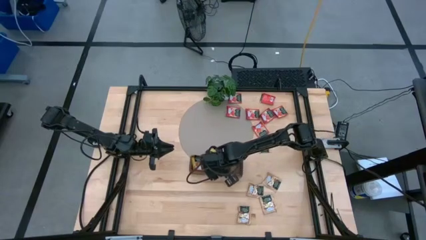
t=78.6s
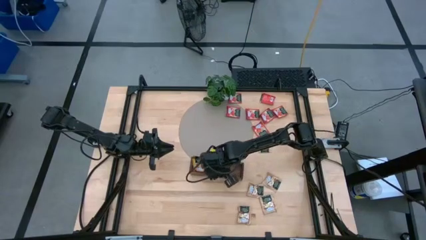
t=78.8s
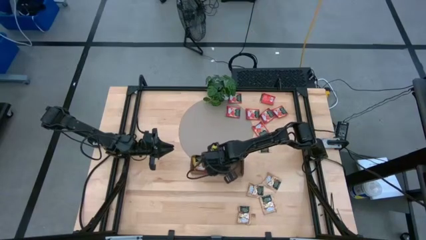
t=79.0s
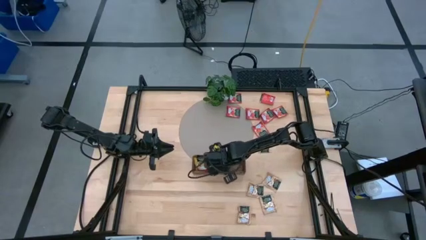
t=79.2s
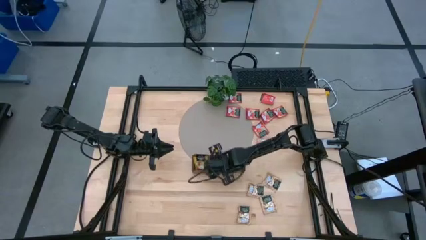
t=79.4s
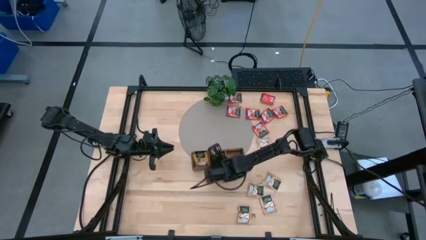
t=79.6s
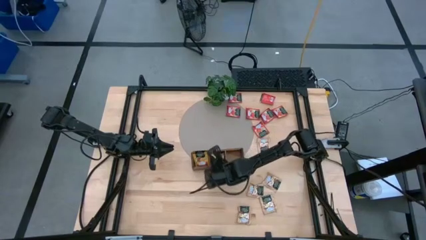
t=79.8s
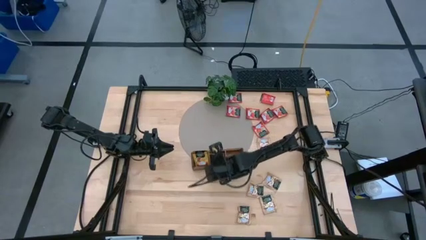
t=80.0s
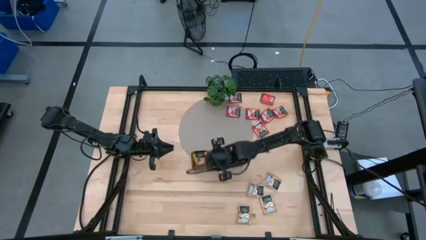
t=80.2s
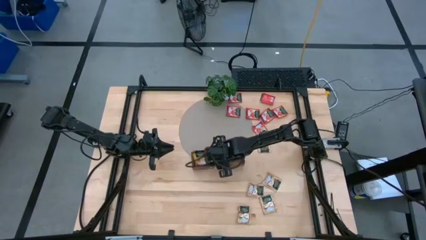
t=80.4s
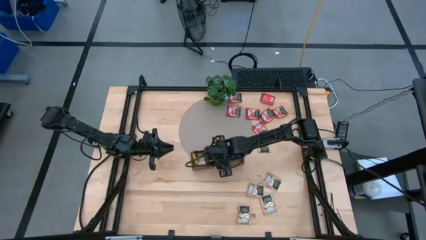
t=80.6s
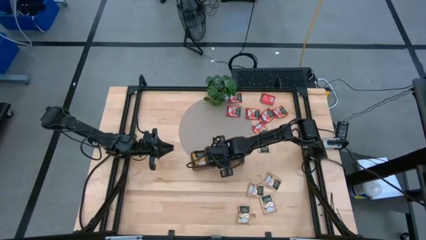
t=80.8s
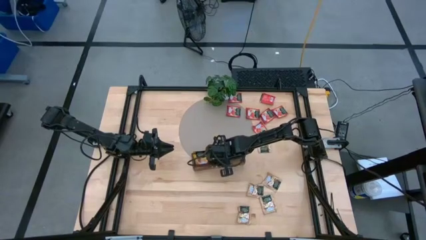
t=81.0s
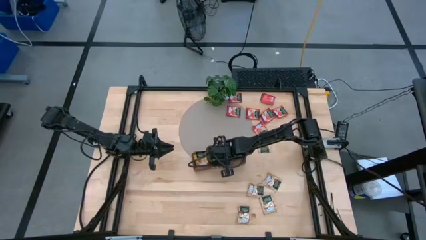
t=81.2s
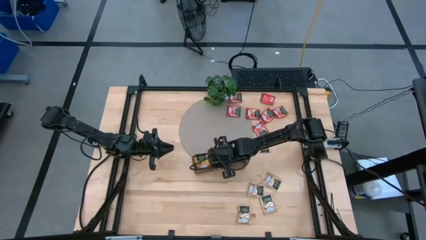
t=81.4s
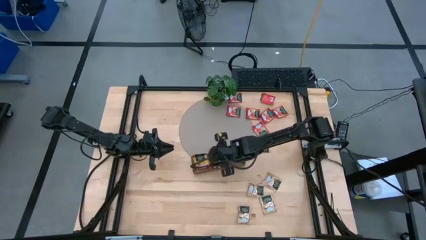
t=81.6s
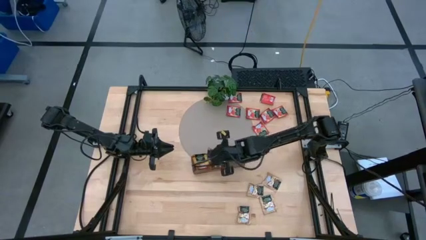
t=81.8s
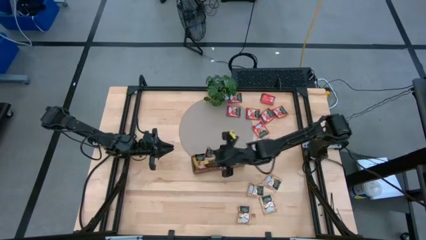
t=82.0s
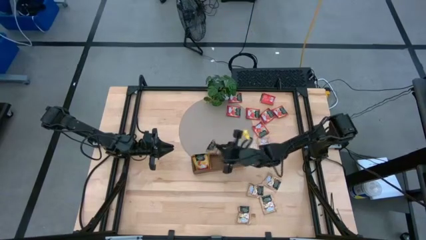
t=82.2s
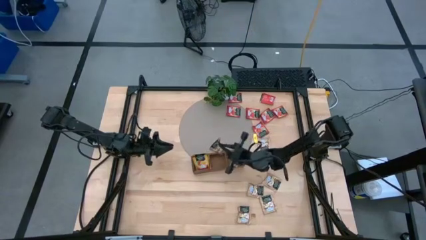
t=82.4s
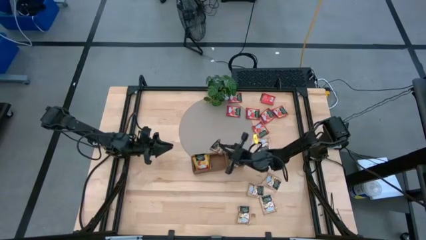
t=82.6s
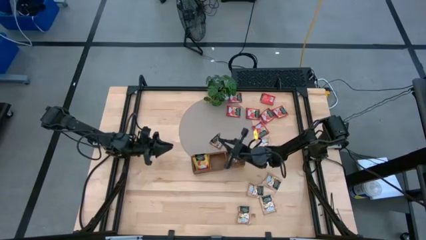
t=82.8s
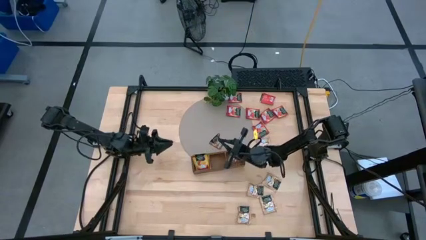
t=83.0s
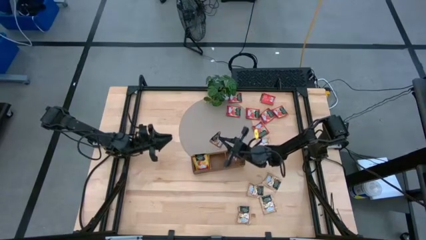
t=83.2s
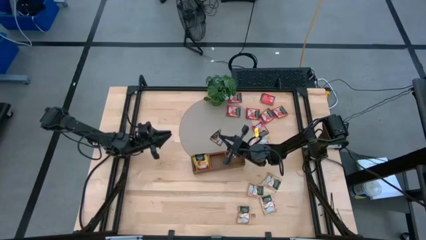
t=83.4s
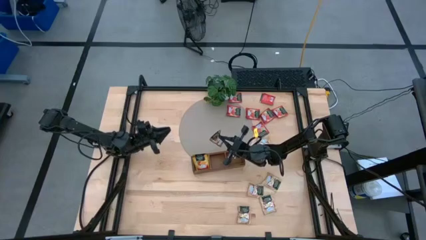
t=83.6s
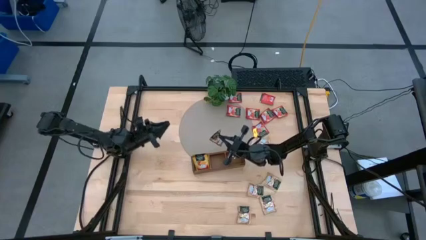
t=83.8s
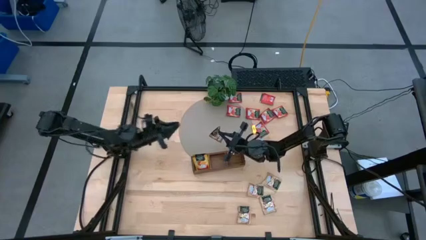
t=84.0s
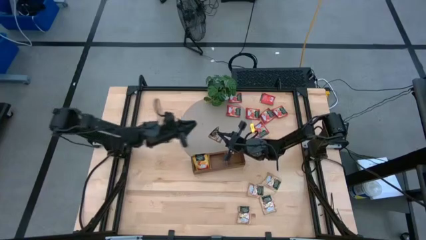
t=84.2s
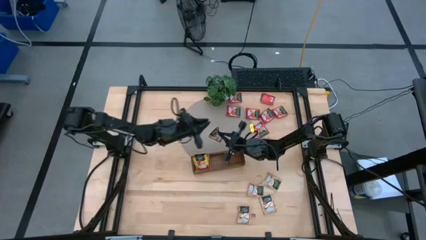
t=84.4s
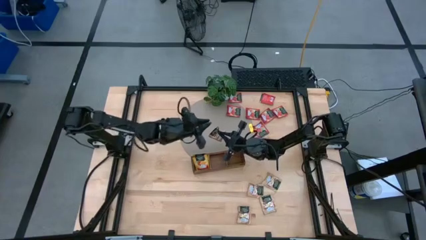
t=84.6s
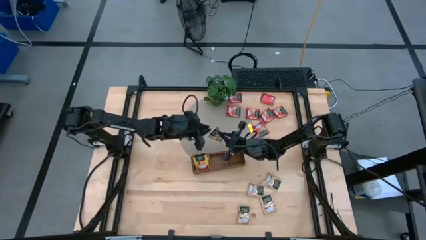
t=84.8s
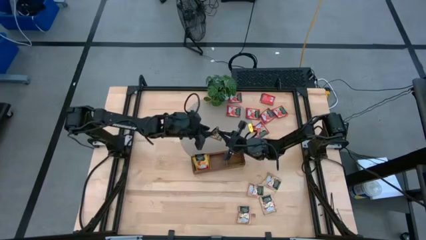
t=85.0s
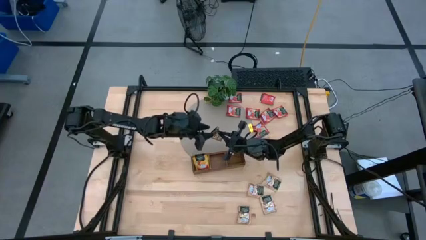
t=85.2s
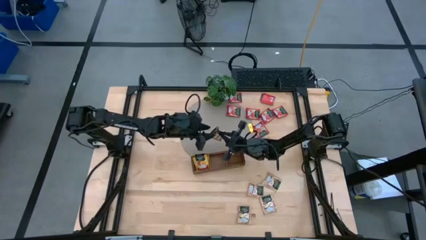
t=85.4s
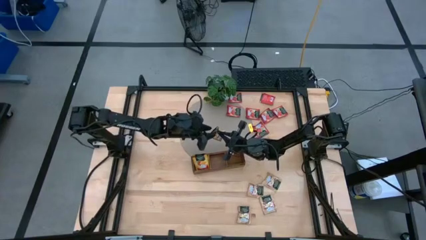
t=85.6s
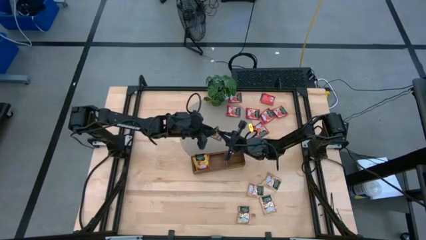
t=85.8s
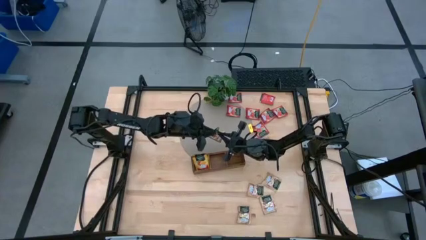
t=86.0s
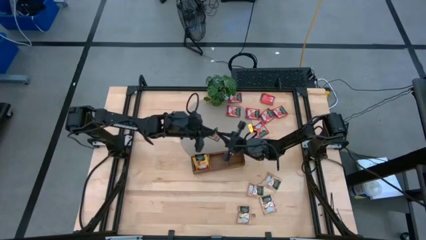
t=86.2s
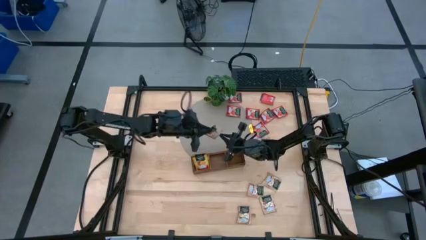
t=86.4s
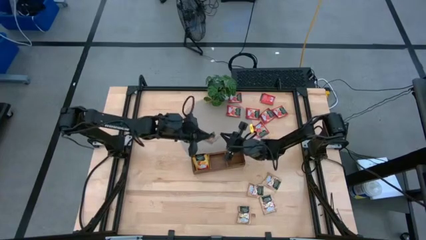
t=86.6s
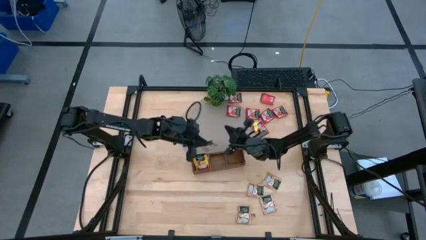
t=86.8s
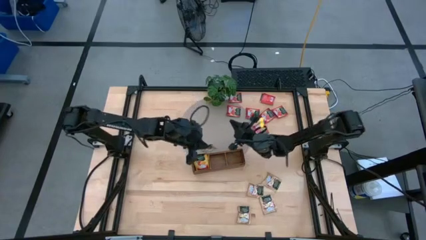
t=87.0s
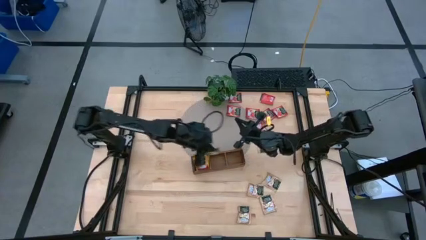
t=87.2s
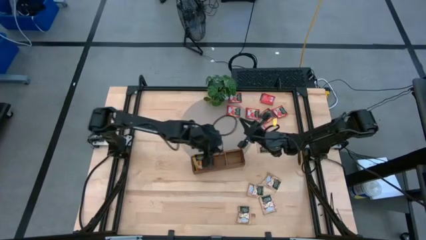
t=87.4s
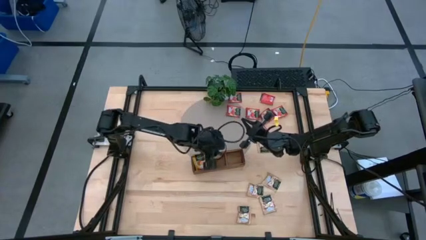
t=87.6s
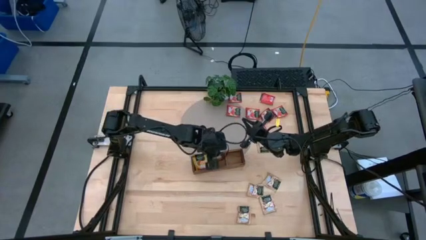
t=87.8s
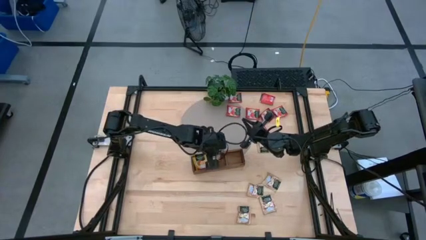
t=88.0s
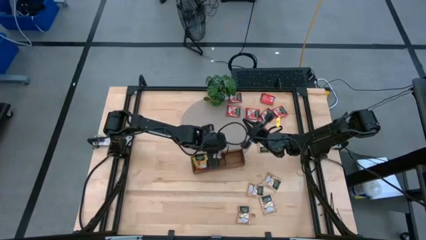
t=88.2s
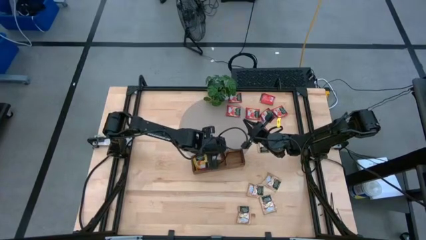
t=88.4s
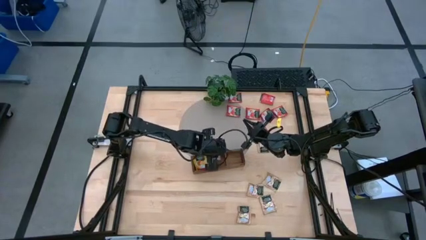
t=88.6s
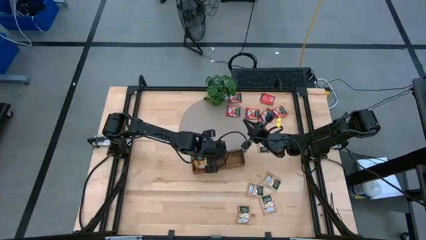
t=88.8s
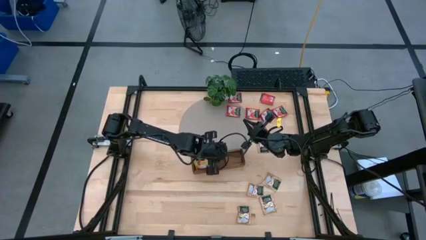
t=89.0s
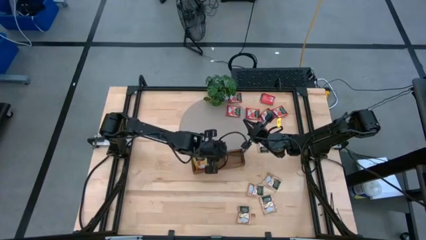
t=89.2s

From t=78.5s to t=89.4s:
Task: Pick & Place Tea
Put the brown tea bag into the middle slot of the wooden organizer
